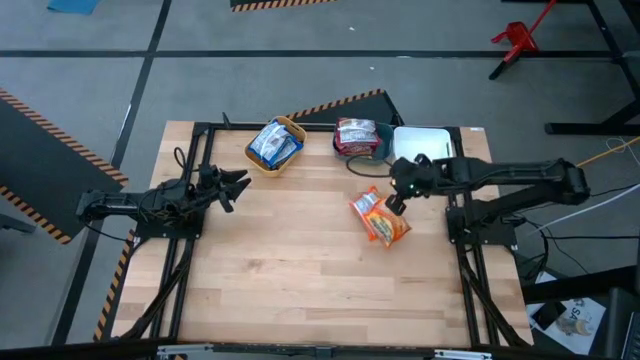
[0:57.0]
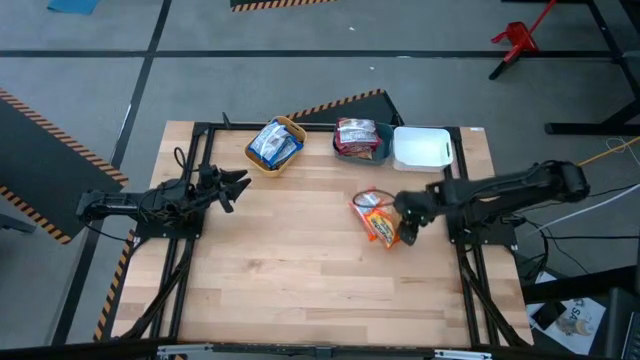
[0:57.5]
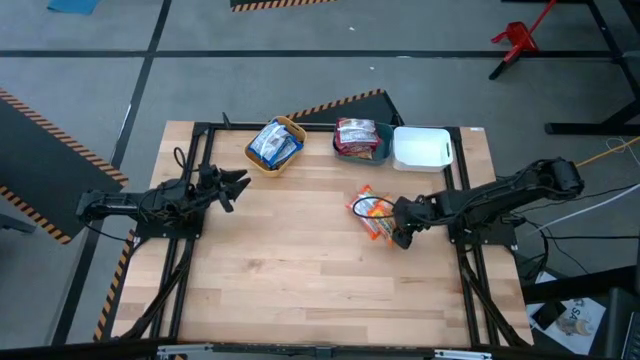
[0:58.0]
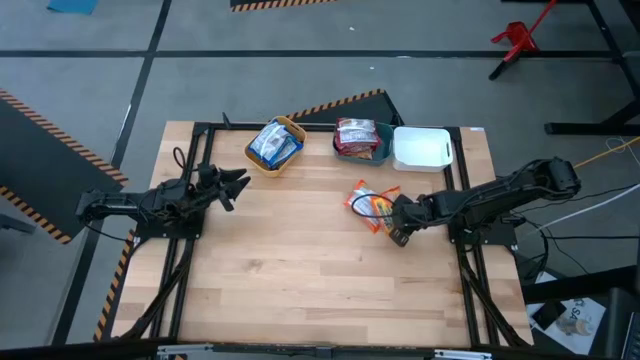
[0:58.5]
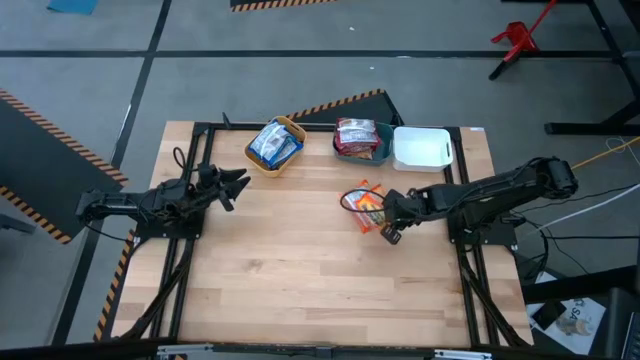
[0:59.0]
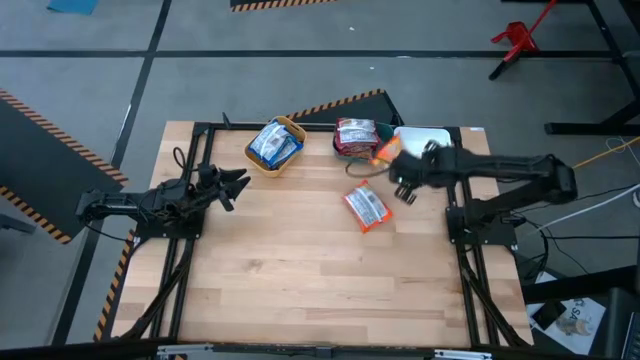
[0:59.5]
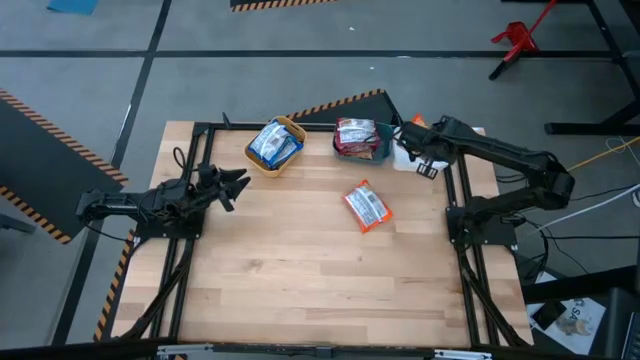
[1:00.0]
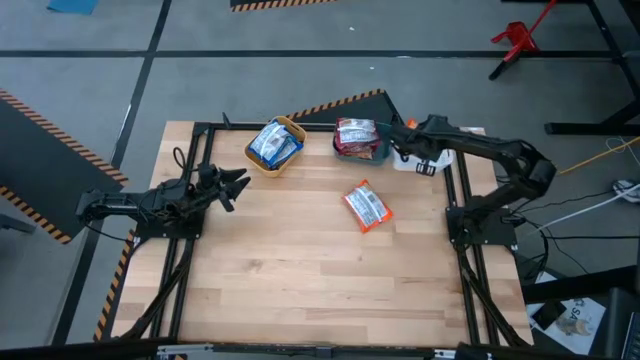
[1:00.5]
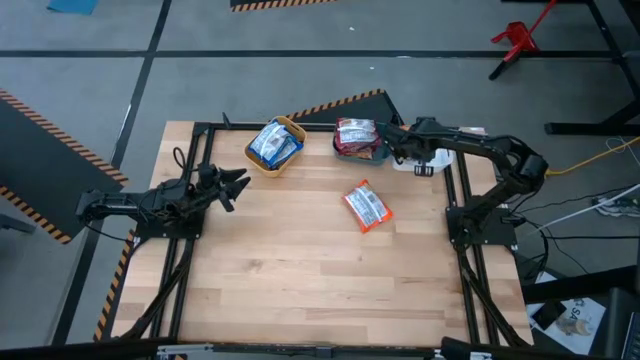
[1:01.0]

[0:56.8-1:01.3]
Task: Sort Maruchan noodles
Put the top orange noodle pack into the white bin

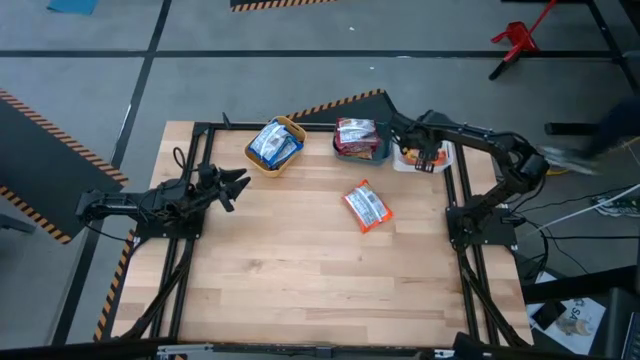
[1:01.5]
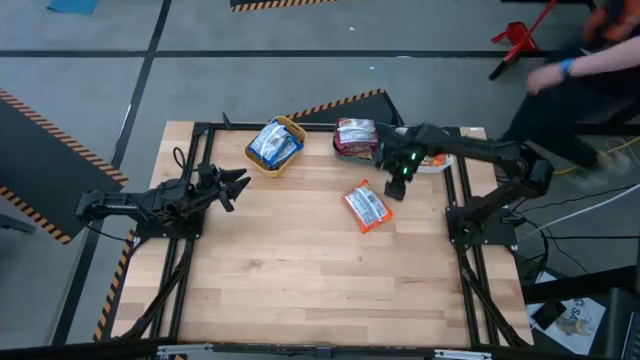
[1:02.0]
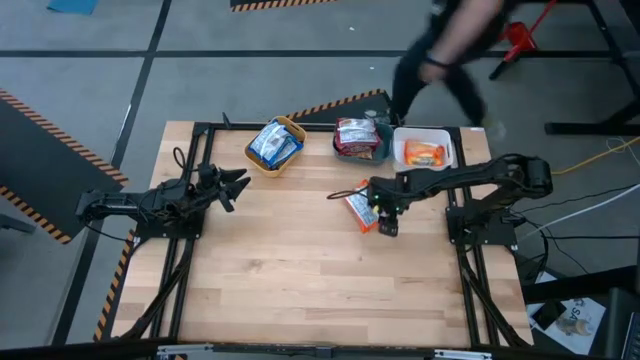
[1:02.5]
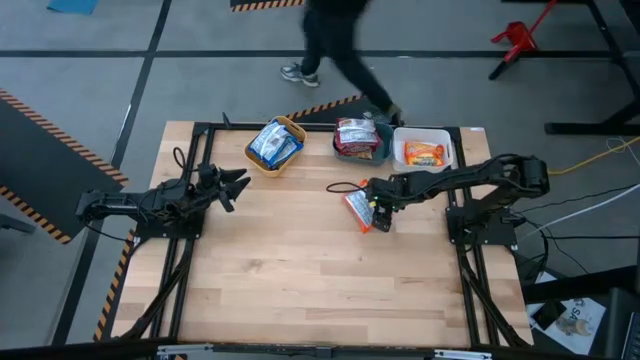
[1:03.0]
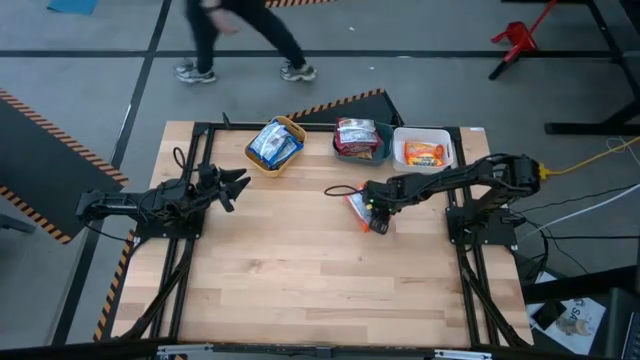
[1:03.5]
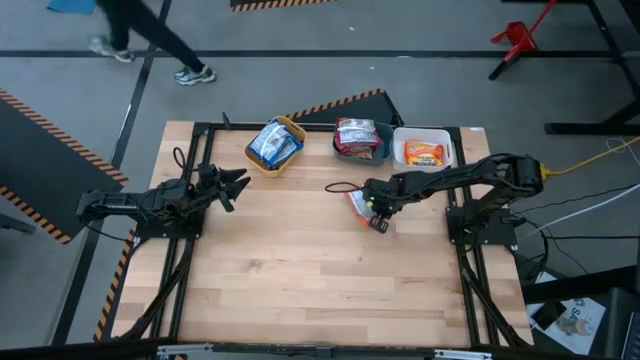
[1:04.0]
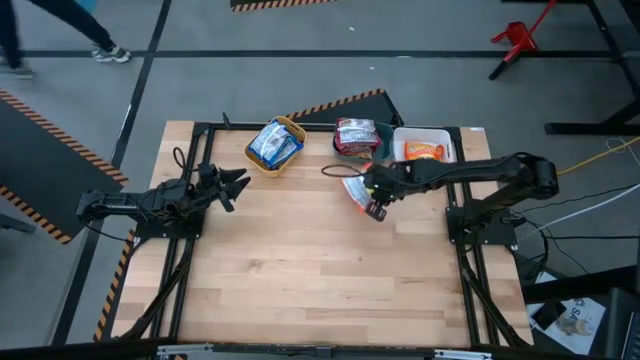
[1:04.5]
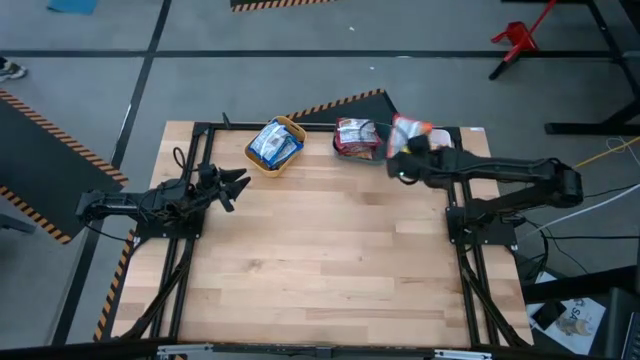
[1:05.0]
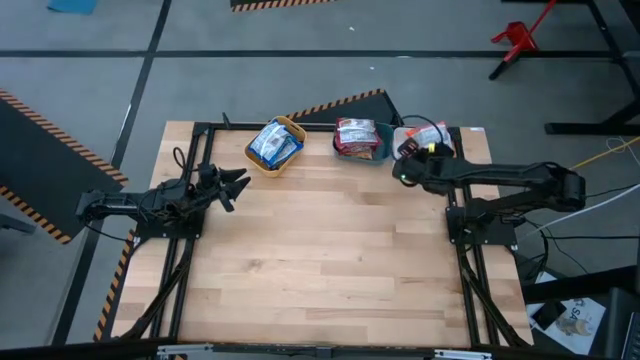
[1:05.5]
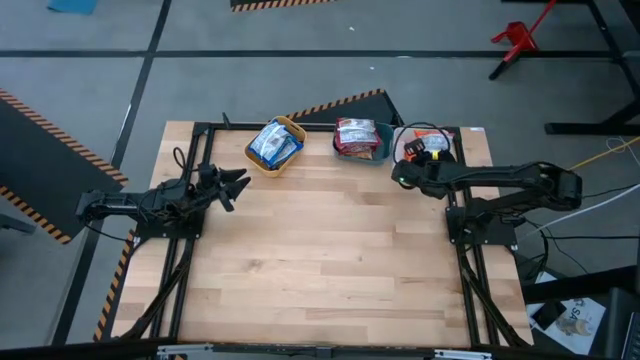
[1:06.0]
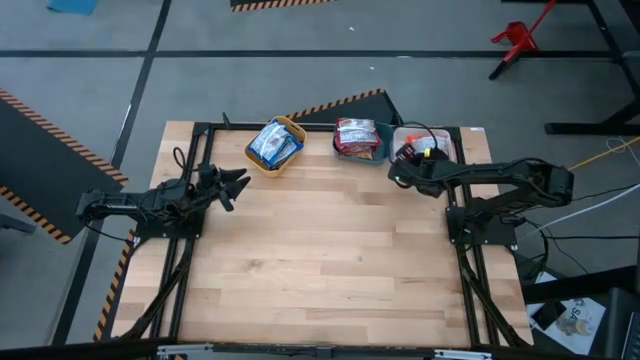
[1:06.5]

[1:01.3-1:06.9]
Put the orange noodle pack into the white bin

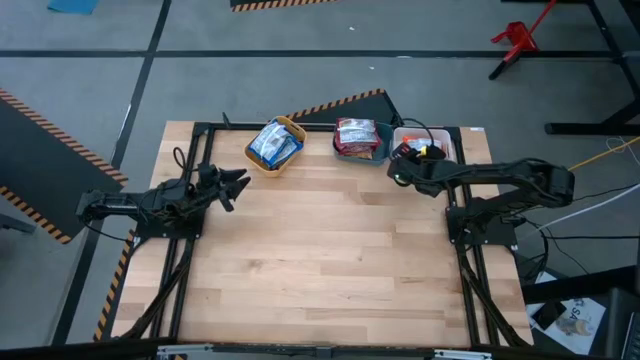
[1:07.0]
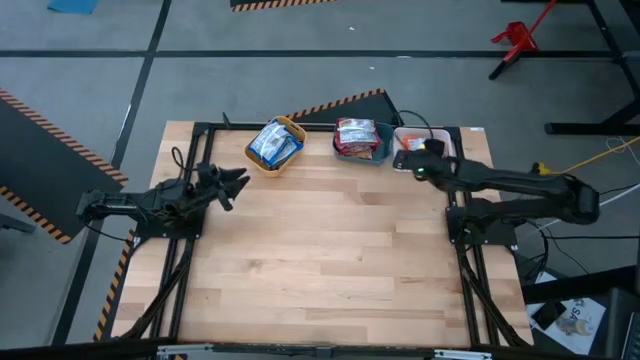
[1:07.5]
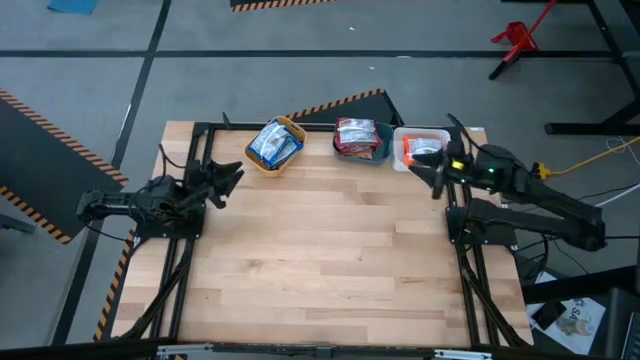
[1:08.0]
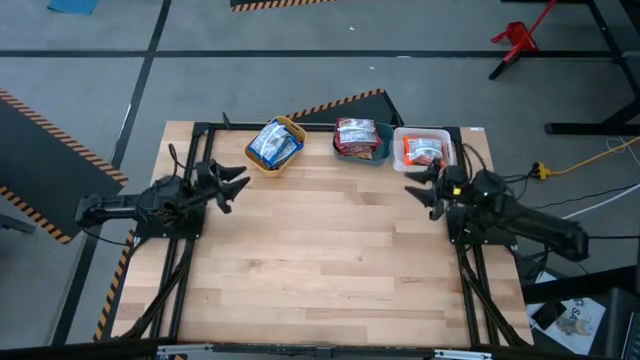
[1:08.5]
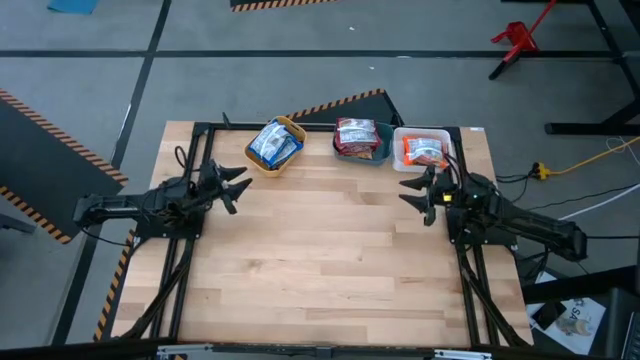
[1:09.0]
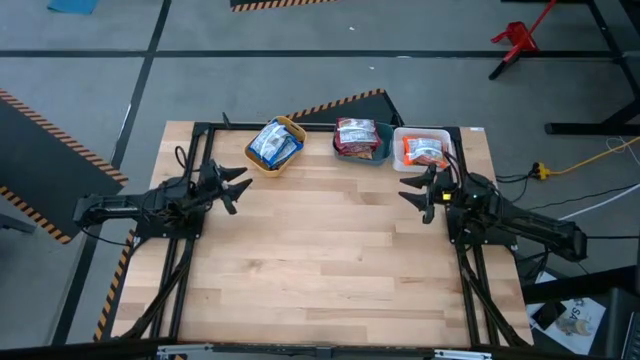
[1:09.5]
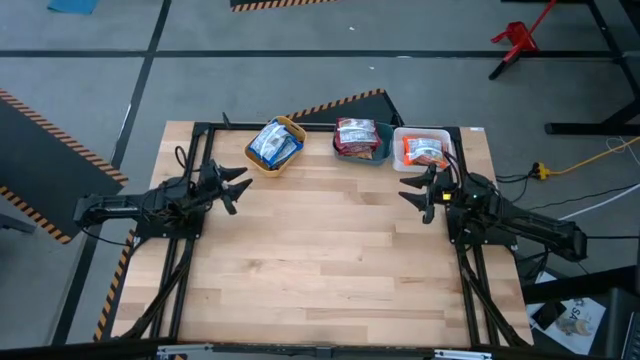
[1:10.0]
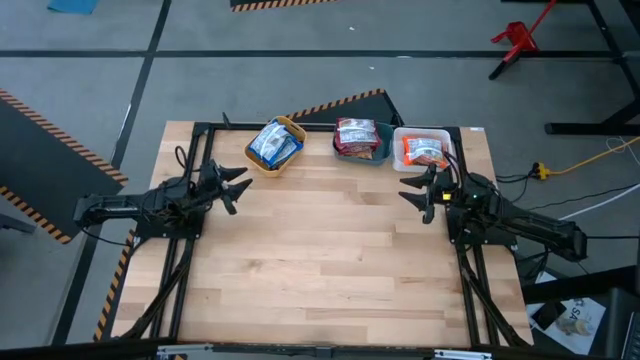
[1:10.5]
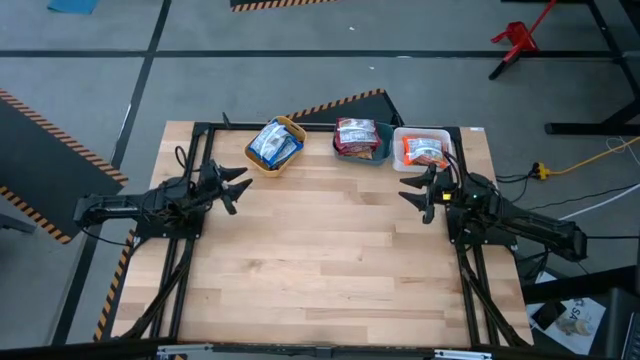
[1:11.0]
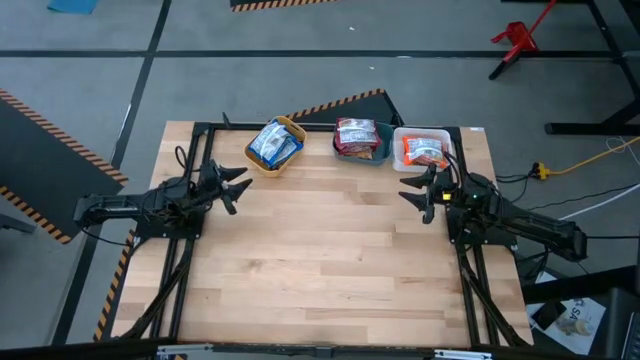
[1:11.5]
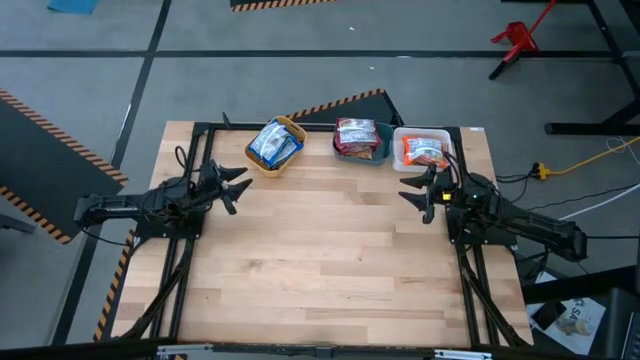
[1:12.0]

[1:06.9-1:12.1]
Return to Home Position

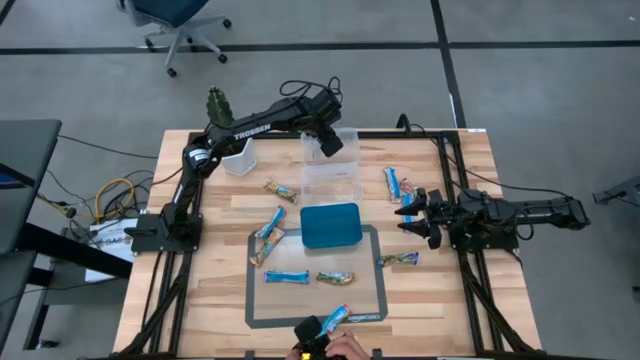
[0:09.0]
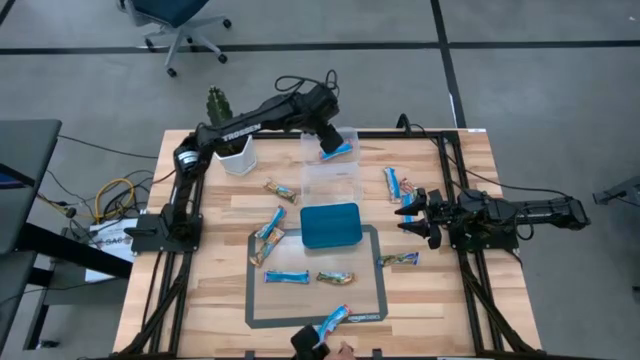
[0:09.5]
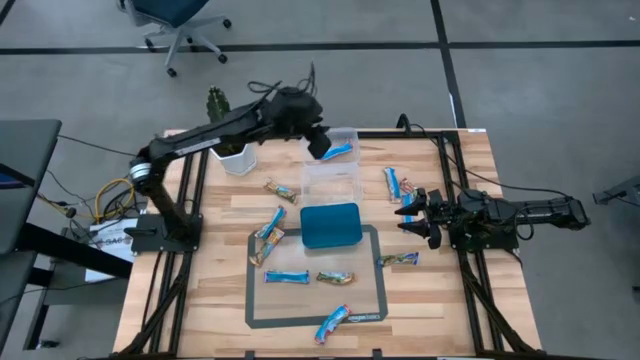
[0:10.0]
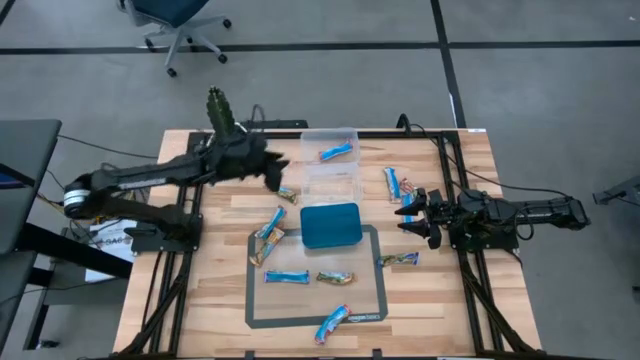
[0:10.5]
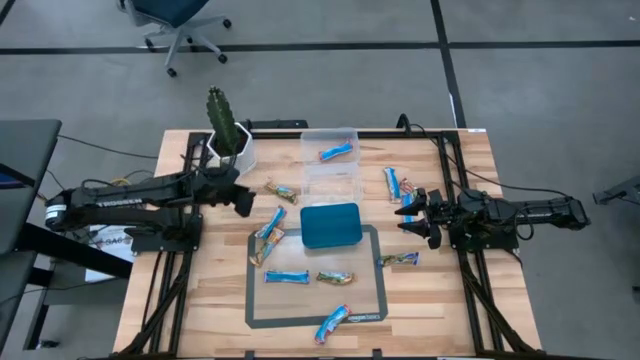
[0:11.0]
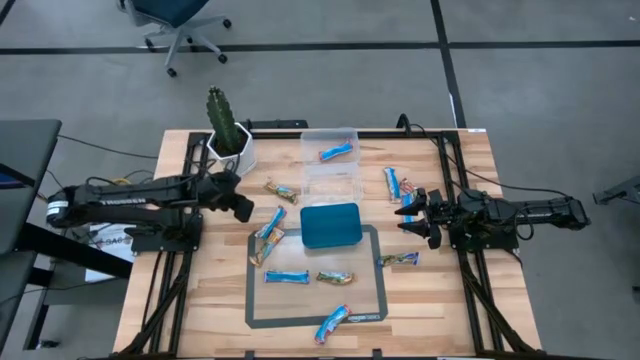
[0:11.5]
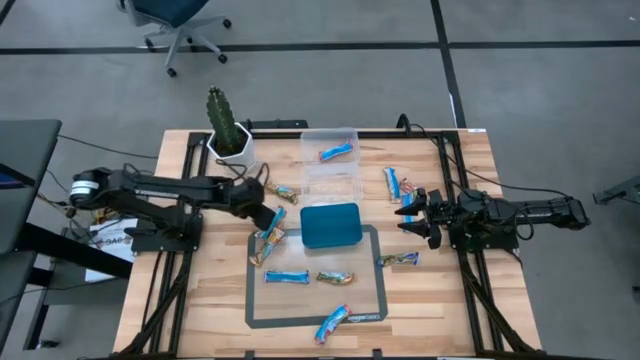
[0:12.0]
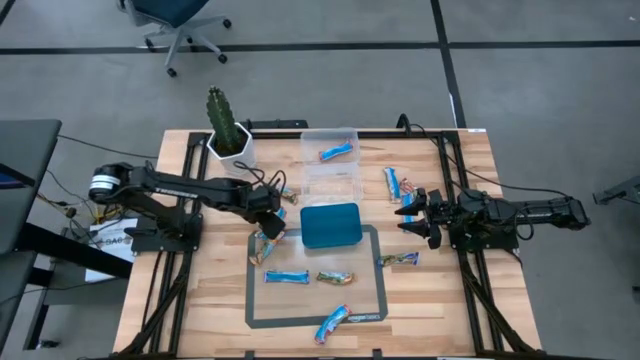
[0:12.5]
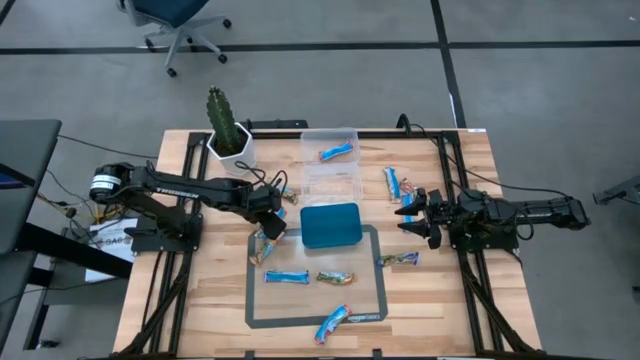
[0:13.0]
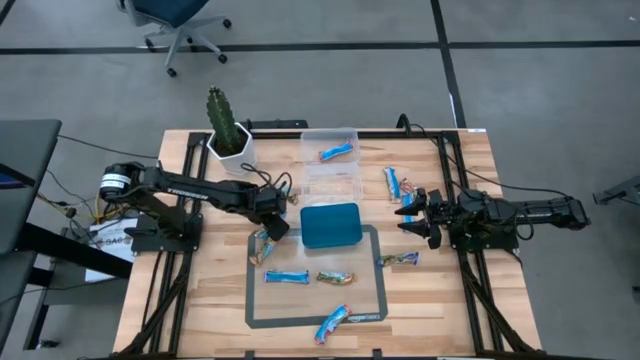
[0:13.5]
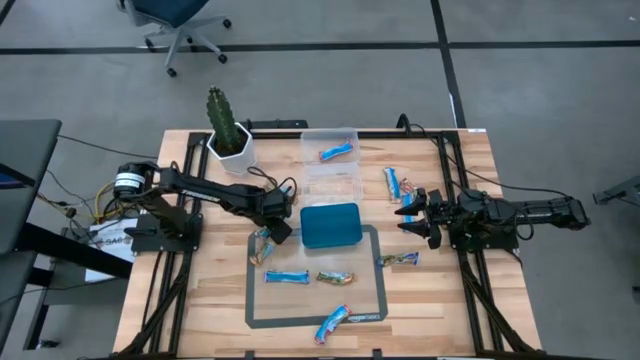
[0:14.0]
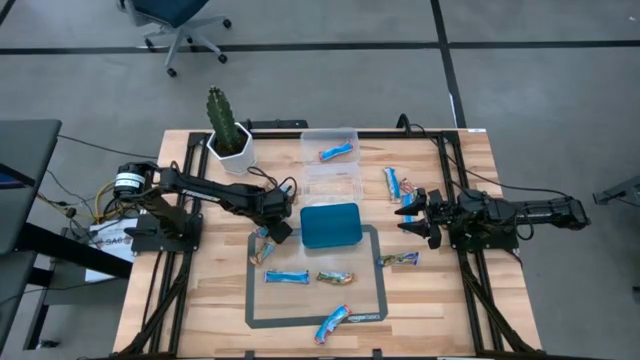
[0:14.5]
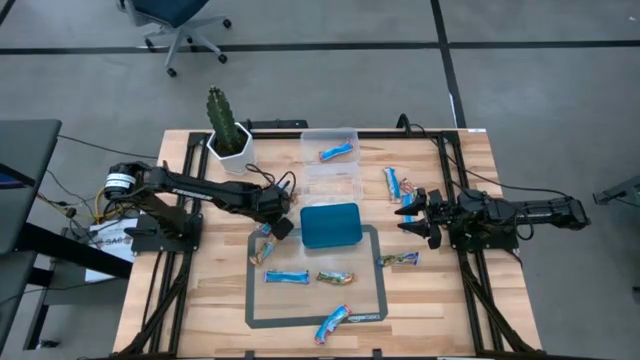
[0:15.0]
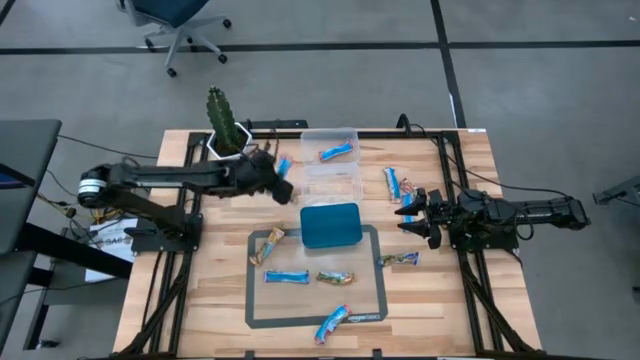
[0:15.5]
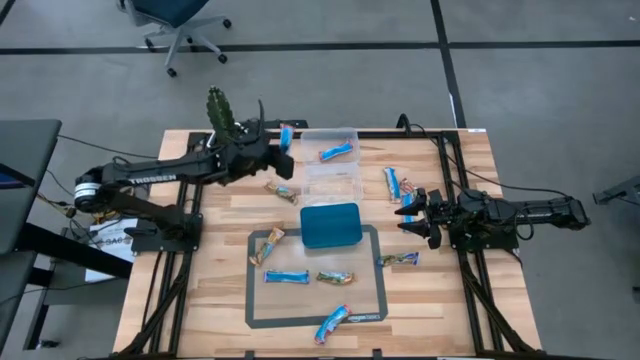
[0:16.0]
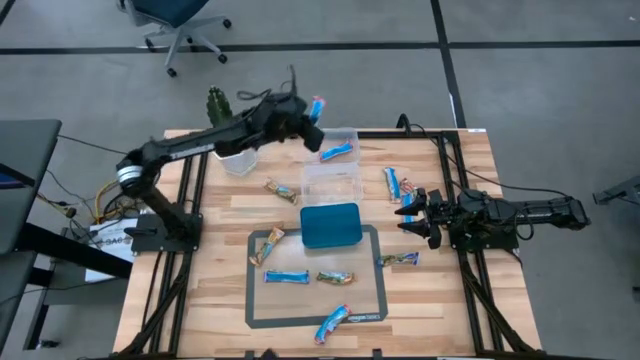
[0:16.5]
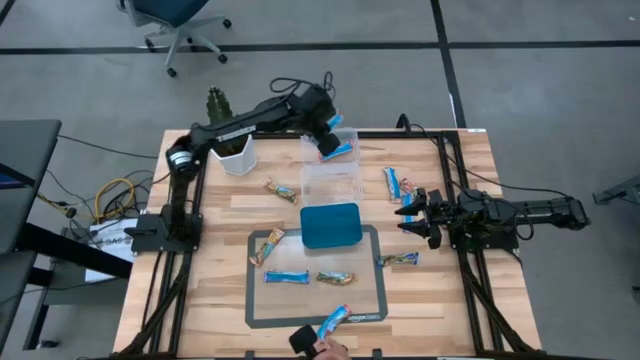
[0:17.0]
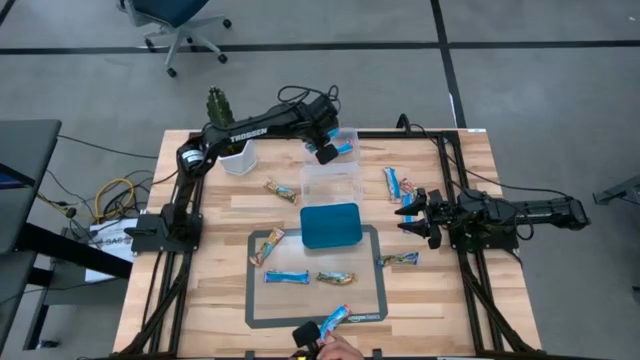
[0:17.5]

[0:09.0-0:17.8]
Task: Pick and place Granola Bars by type
Put the red granola bar into the top transparent bin
